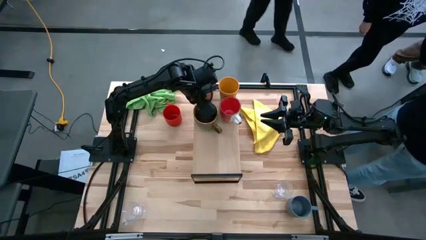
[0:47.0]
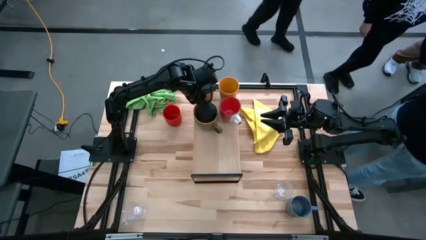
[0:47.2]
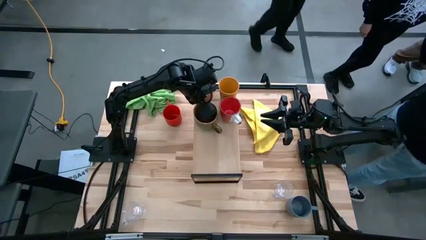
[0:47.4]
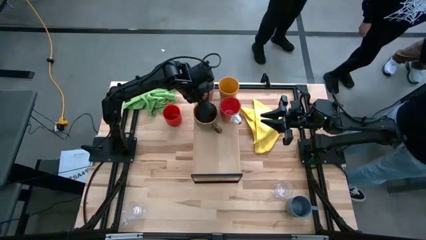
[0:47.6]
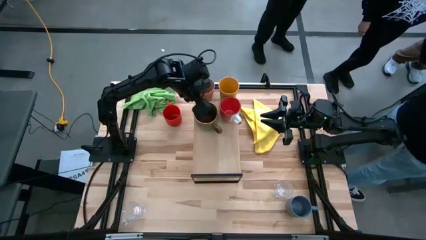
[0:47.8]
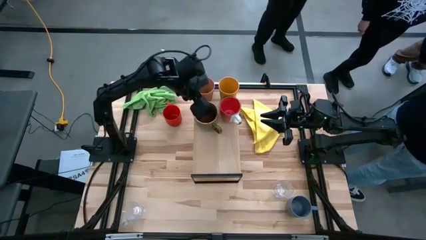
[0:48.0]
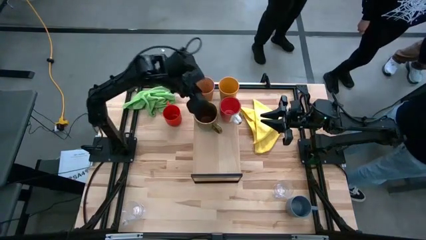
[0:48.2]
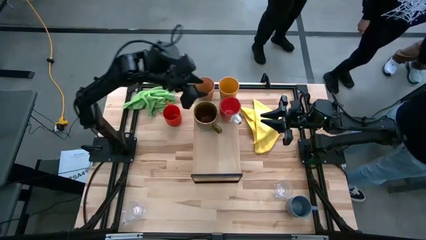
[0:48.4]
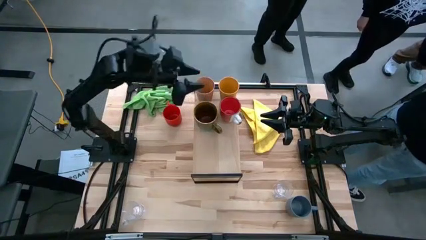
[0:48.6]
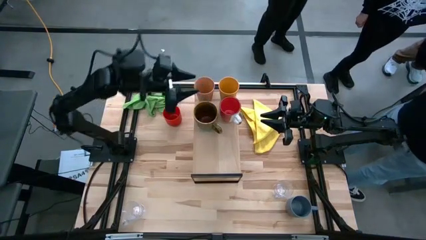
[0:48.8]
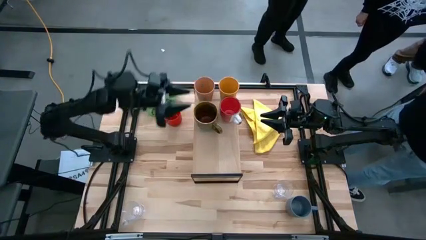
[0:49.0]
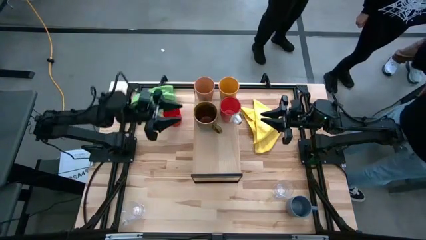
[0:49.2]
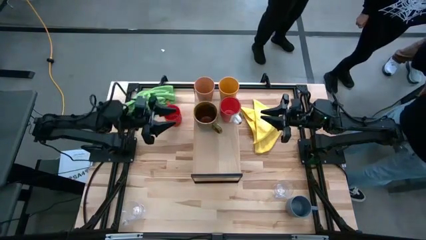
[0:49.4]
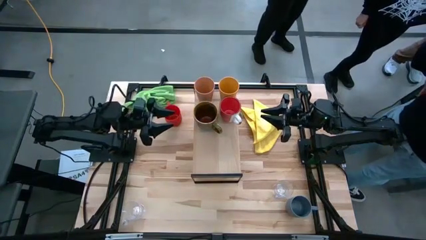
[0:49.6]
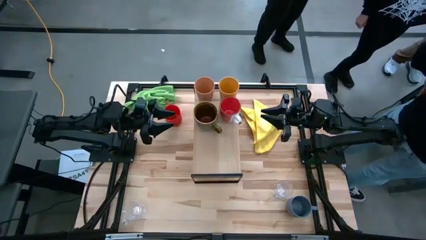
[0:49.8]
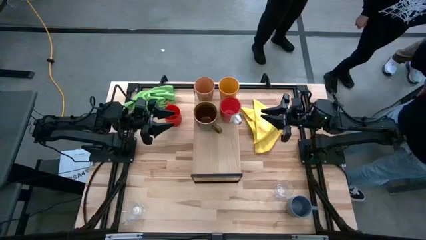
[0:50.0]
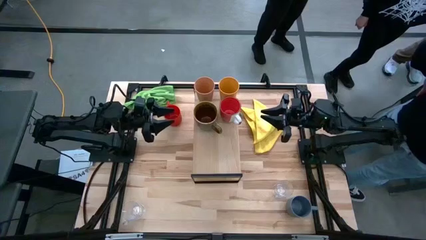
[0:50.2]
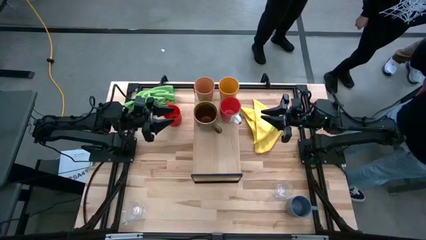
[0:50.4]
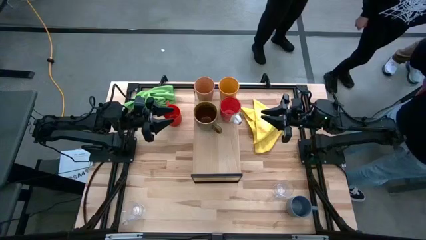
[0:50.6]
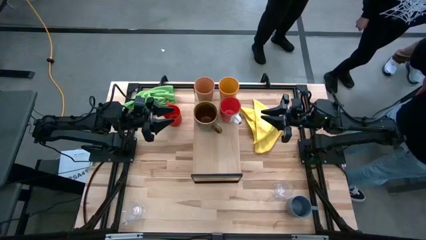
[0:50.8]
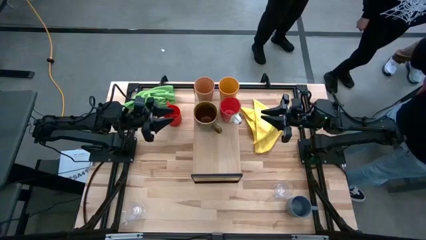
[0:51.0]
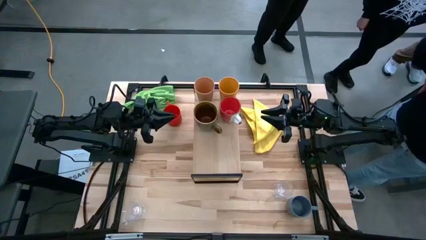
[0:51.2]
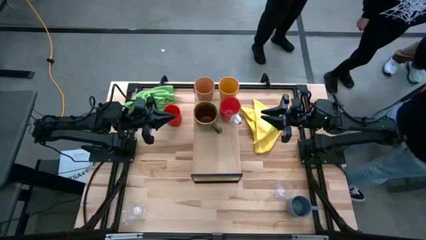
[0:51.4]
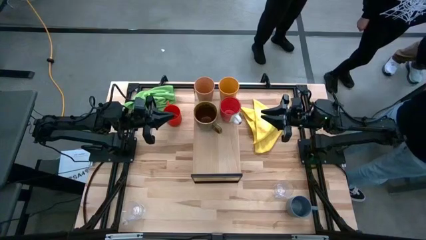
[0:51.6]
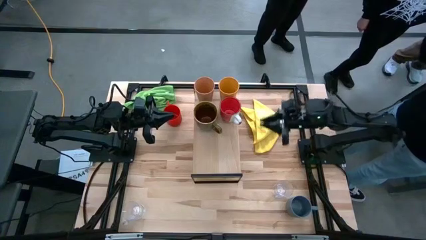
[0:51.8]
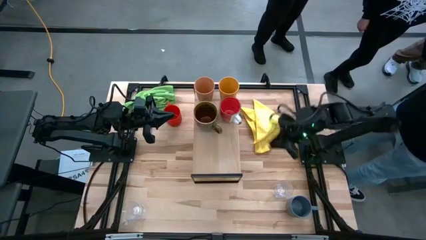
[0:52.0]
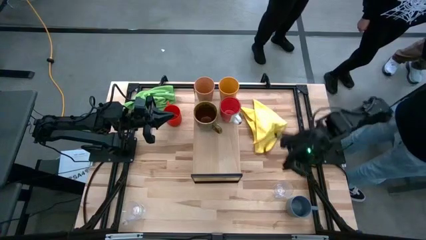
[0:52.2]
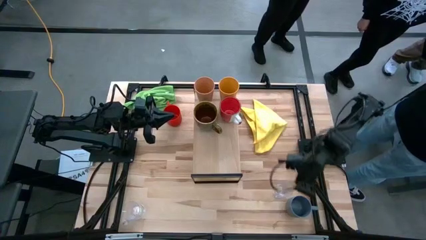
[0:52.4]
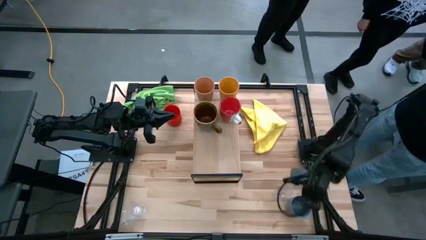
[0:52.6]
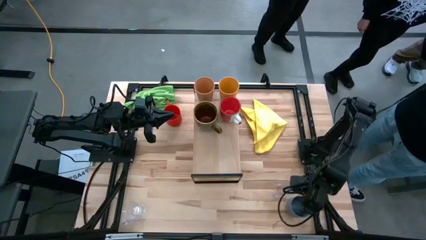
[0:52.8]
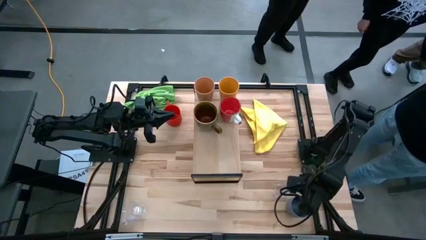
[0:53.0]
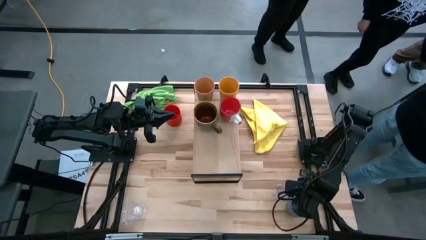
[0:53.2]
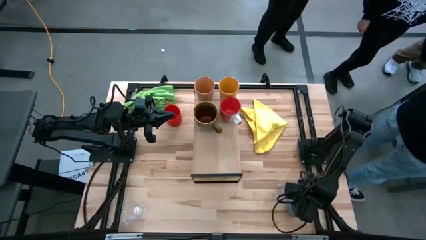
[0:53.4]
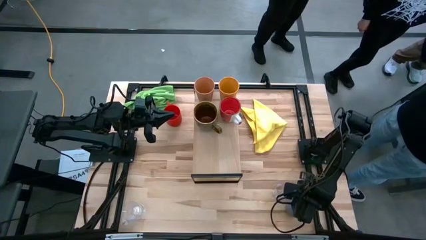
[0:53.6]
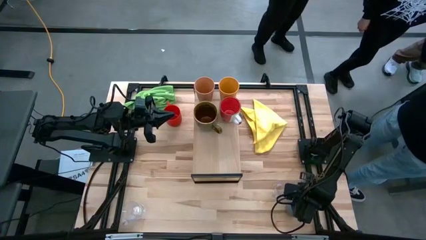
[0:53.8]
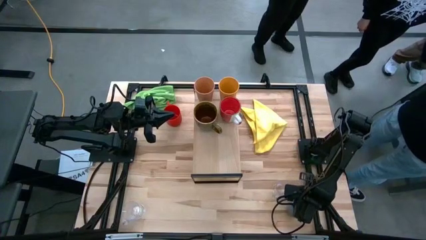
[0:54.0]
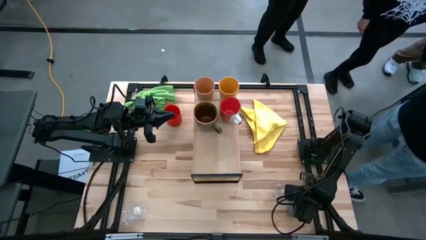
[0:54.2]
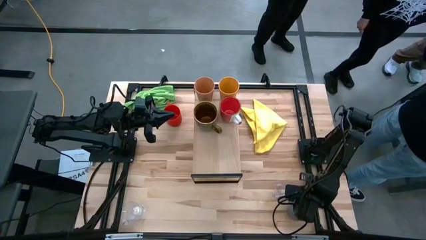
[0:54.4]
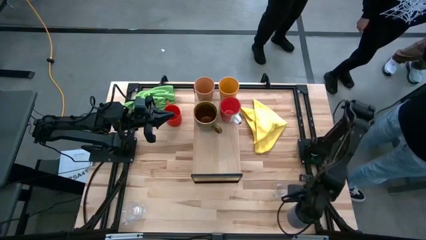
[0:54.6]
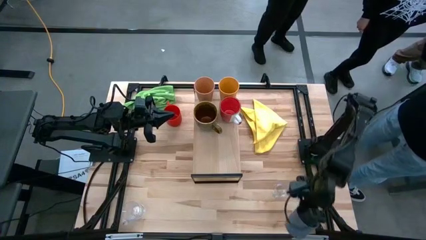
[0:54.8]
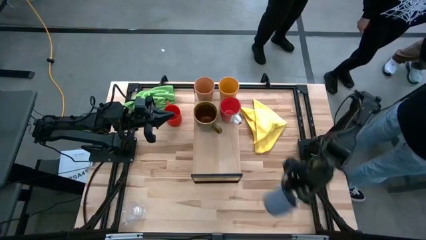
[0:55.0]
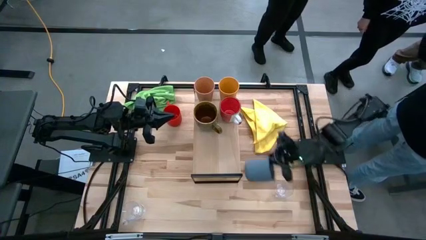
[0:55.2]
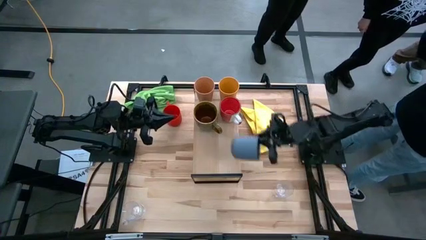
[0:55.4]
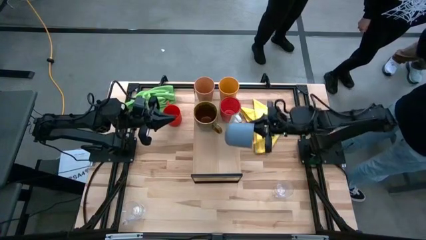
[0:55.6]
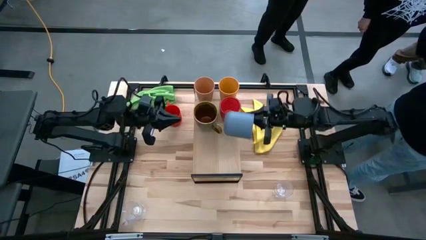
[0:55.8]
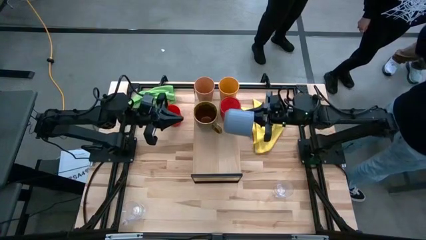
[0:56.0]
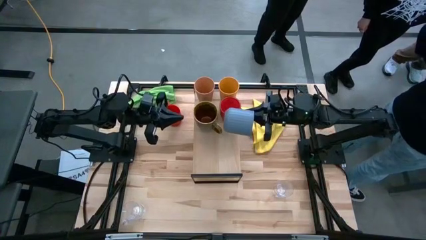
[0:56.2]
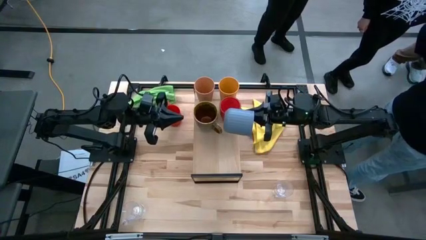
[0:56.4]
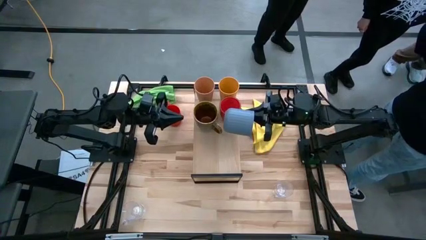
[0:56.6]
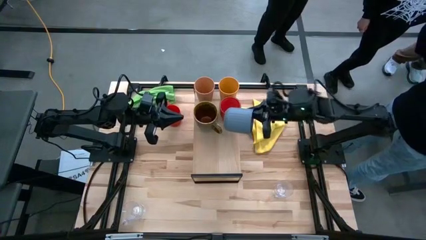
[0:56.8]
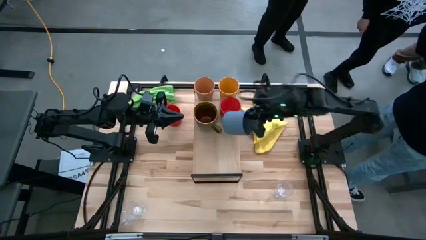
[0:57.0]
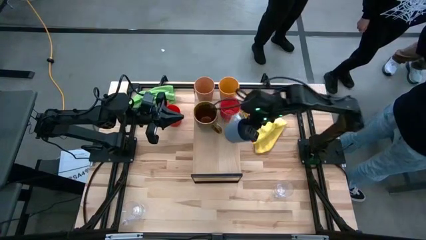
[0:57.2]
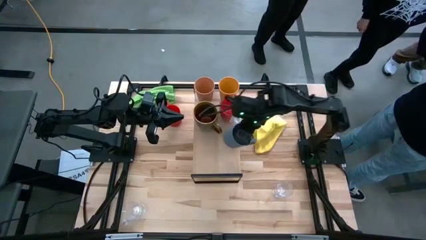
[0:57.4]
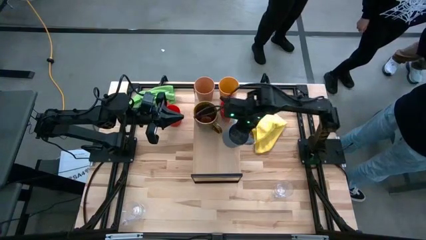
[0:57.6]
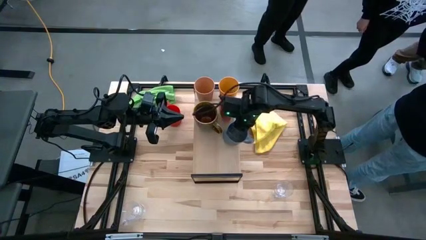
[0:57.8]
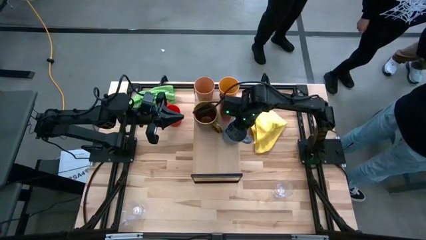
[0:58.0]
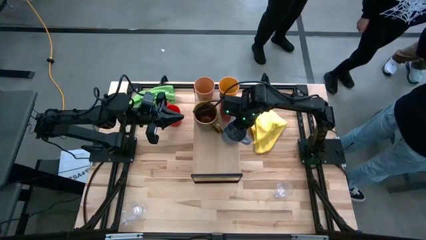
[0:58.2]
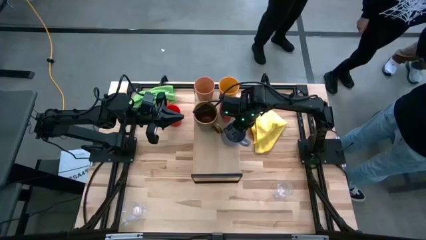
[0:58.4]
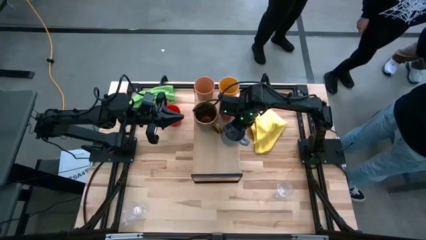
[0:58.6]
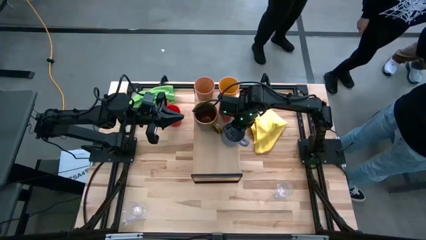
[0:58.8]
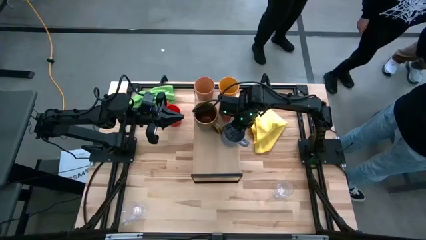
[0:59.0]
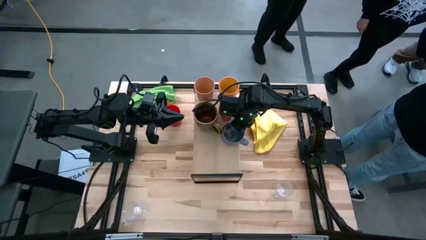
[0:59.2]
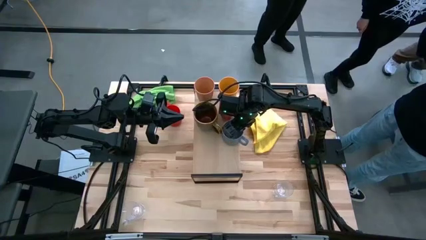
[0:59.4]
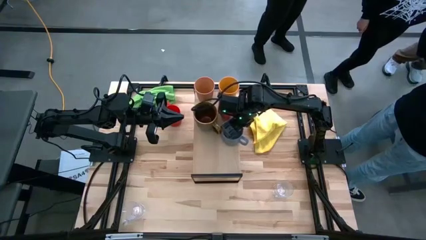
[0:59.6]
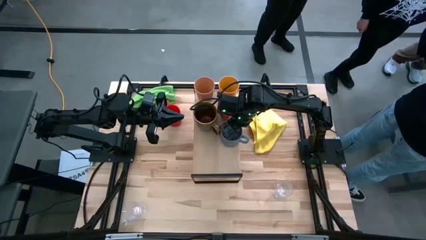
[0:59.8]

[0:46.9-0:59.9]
Task: Stack small to large cups/mugs on shelf
Put the blue cup on the shelf

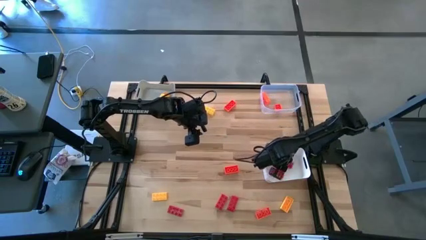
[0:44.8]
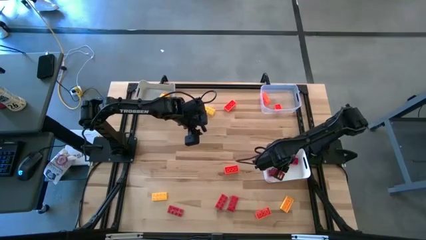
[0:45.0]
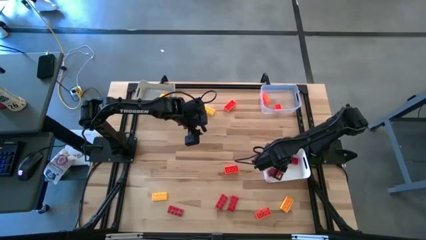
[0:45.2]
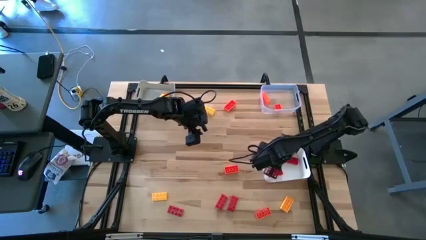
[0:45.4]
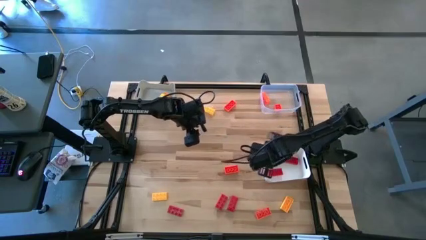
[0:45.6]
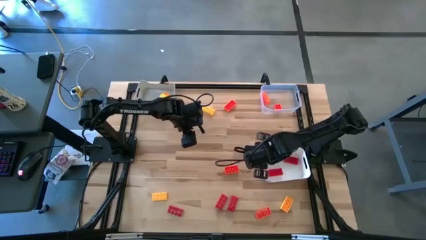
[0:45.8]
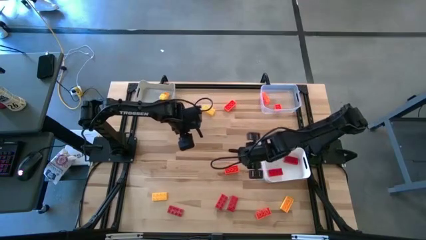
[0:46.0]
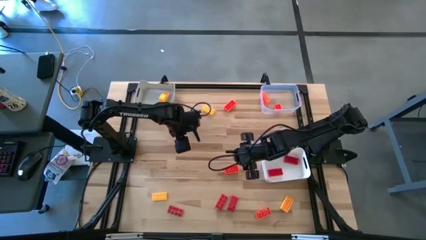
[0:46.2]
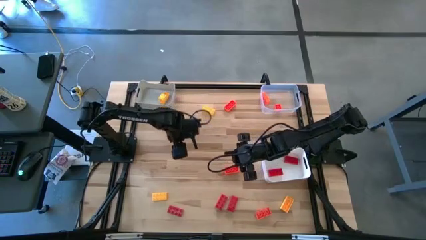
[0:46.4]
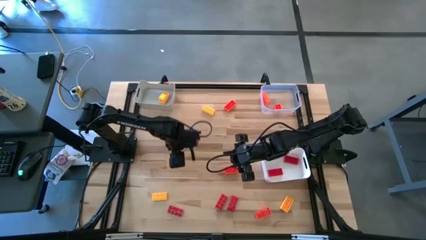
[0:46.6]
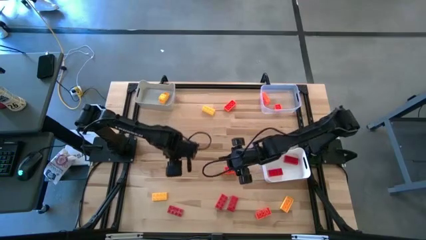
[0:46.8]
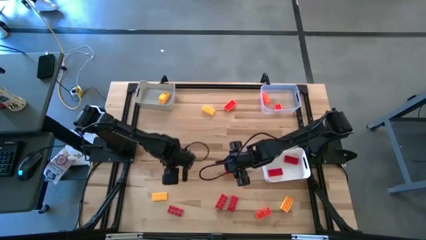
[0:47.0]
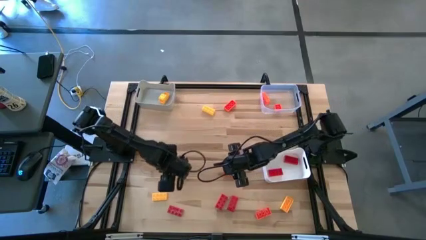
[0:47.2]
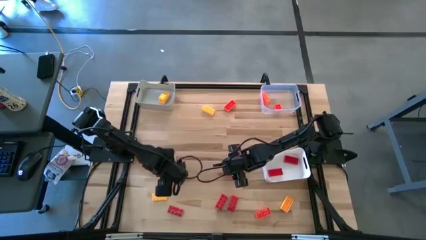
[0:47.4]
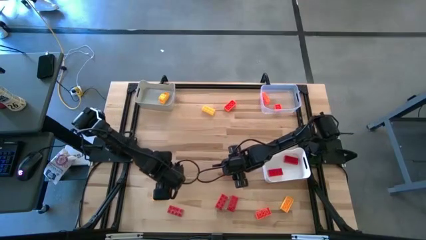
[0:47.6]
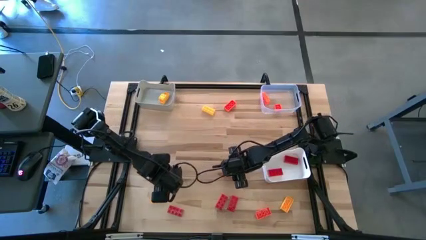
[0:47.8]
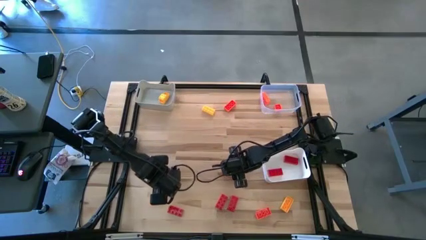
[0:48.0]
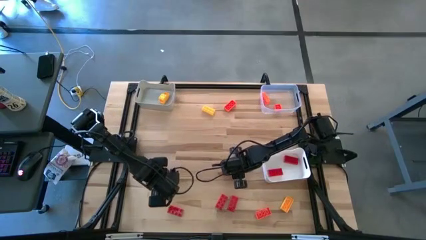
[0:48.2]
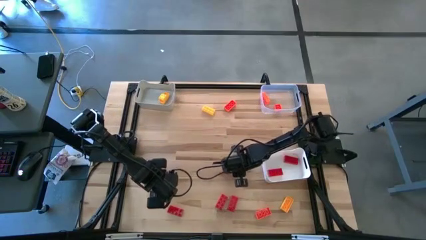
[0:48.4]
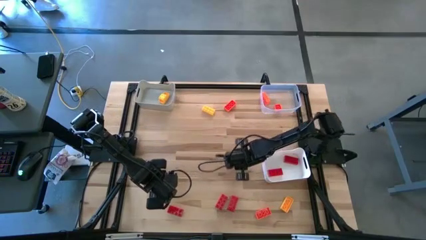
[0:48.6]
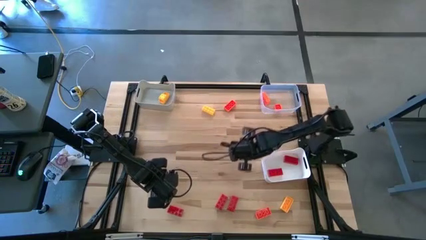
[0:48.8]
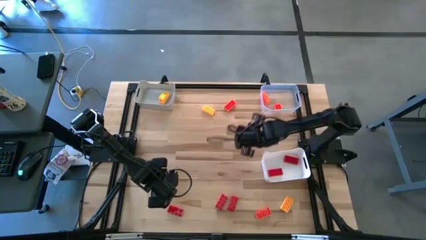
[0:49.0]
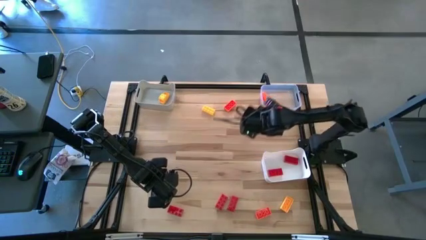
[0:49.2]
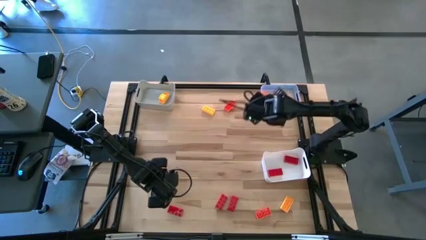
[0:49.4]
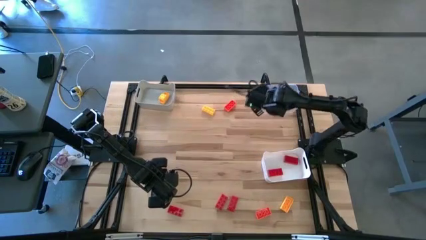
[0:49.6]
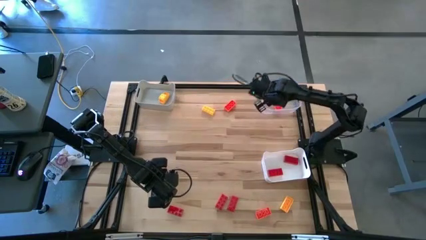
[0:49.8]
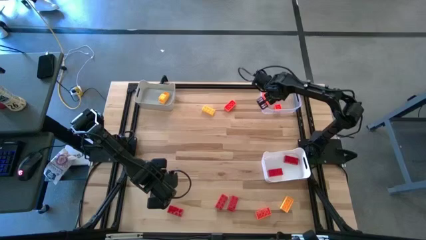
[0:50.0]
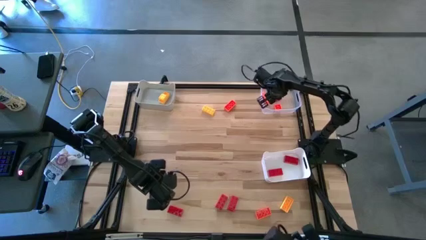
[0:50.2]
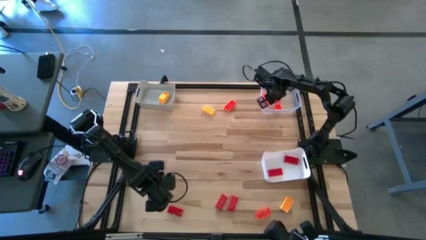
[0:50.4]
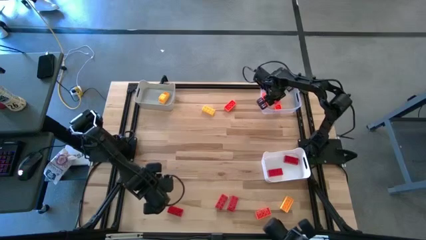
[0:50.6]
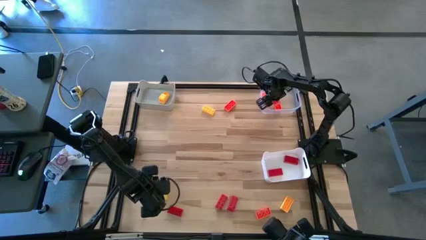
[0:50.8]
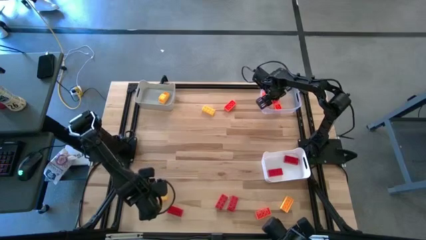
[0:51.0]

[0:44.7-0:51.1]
Task: Sort & place blocks by color
Put the orange block into the transparent bin
